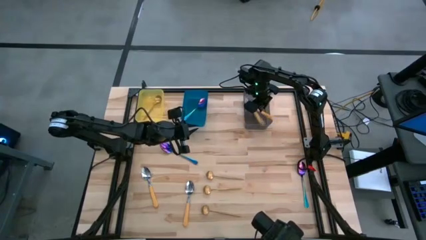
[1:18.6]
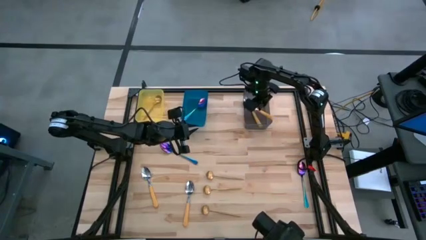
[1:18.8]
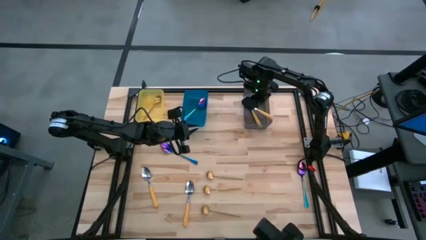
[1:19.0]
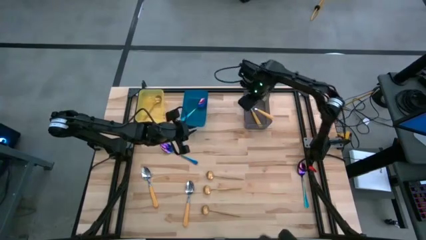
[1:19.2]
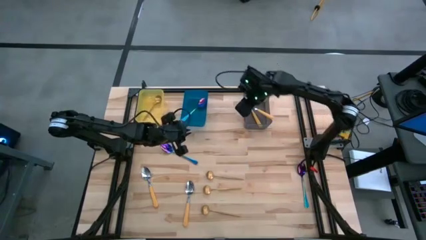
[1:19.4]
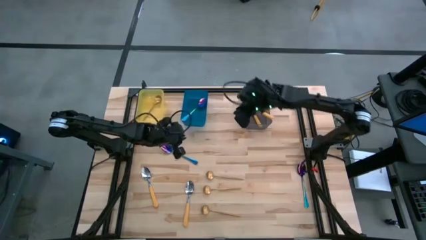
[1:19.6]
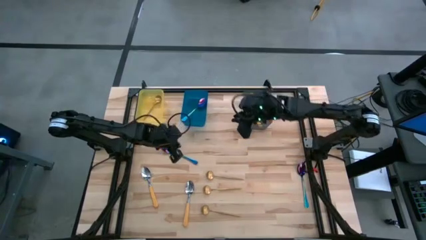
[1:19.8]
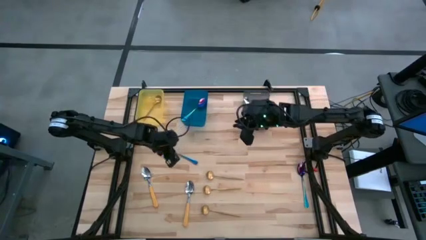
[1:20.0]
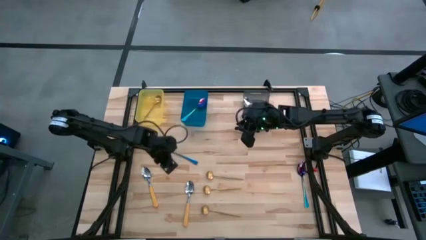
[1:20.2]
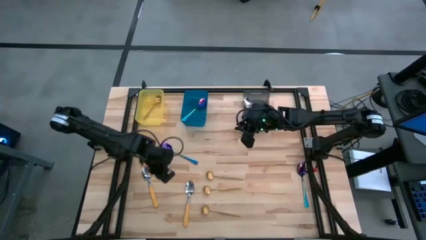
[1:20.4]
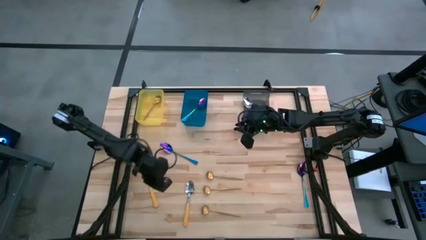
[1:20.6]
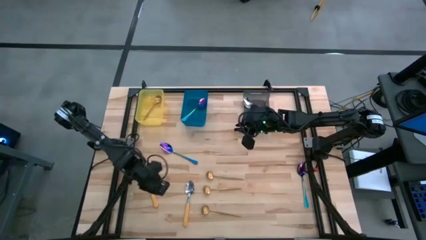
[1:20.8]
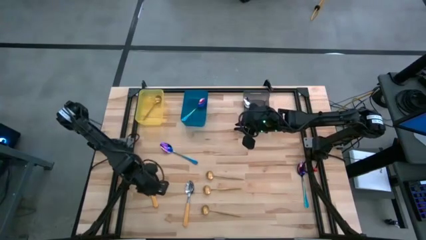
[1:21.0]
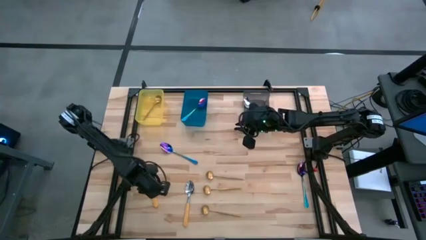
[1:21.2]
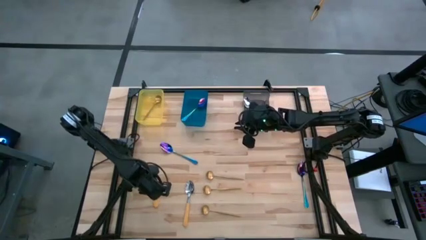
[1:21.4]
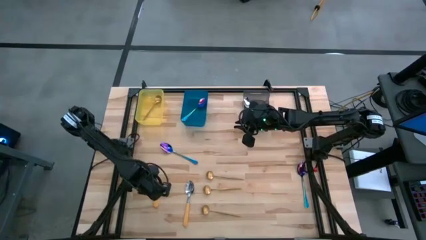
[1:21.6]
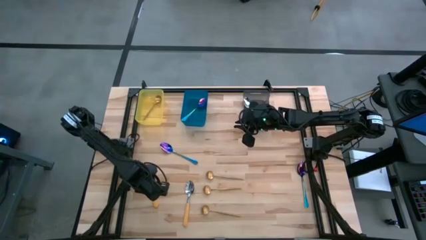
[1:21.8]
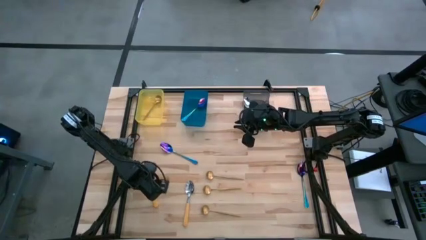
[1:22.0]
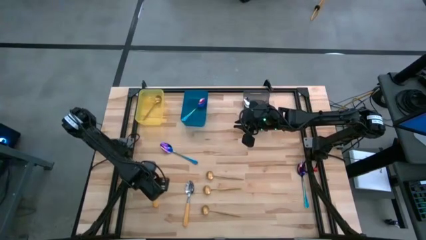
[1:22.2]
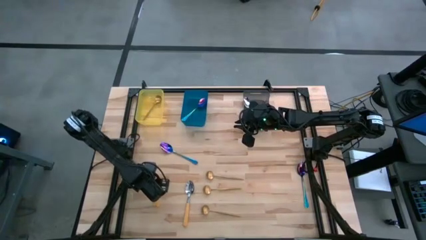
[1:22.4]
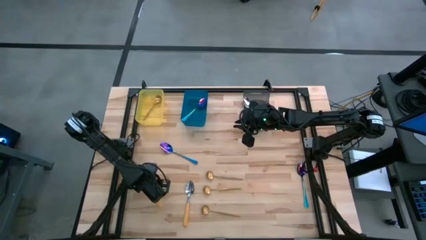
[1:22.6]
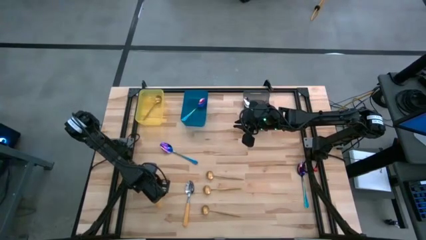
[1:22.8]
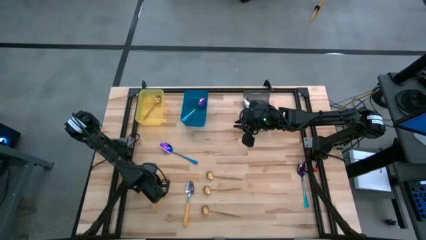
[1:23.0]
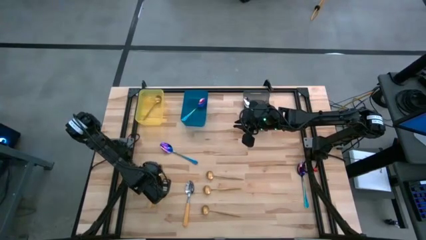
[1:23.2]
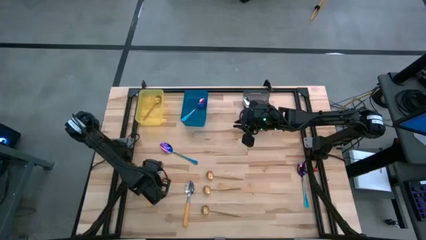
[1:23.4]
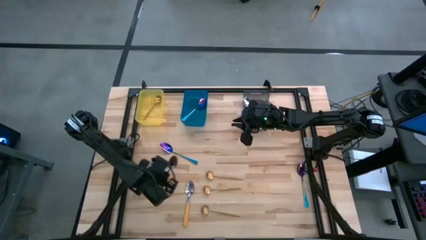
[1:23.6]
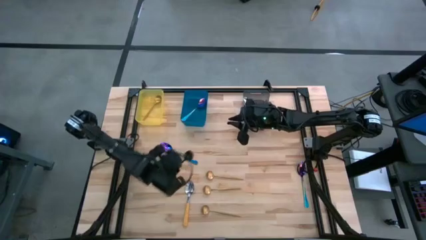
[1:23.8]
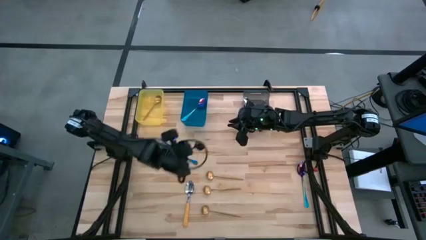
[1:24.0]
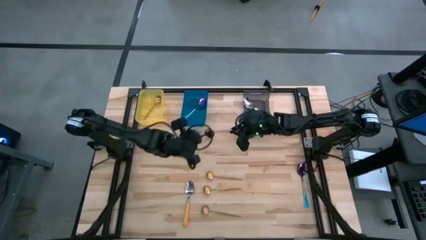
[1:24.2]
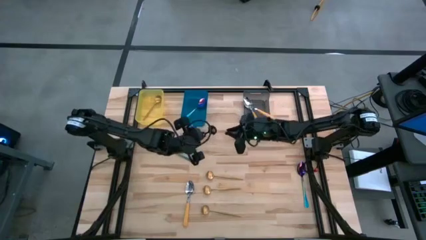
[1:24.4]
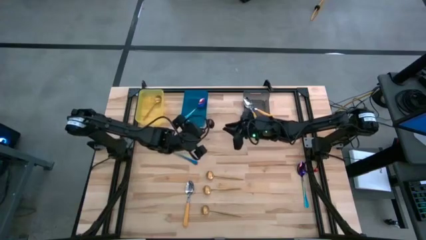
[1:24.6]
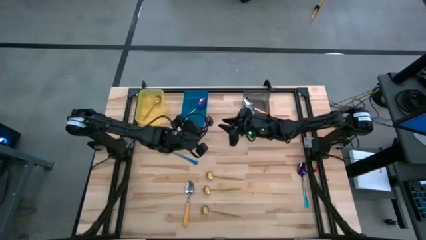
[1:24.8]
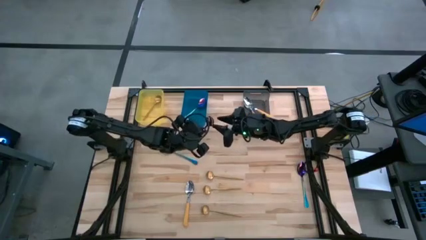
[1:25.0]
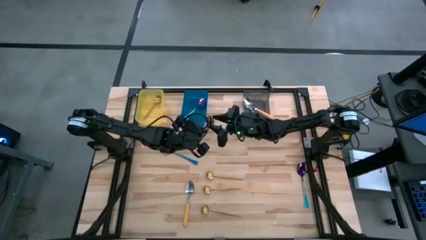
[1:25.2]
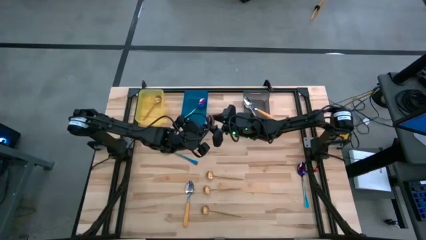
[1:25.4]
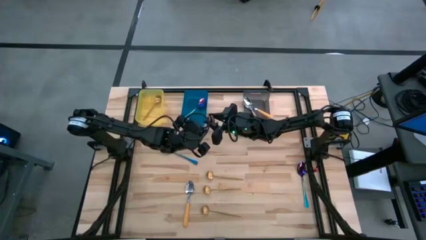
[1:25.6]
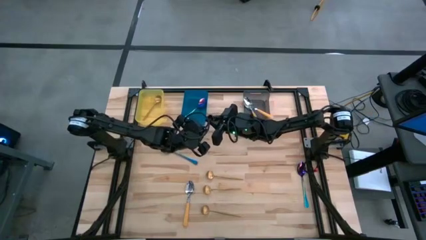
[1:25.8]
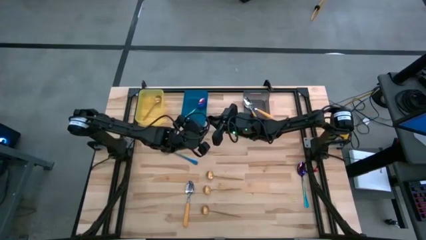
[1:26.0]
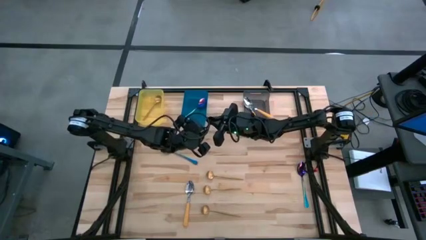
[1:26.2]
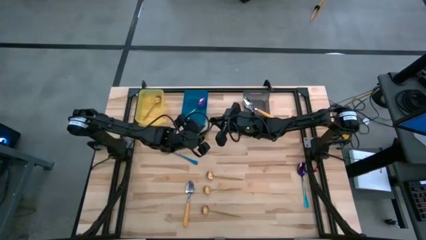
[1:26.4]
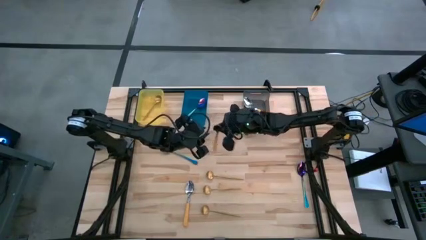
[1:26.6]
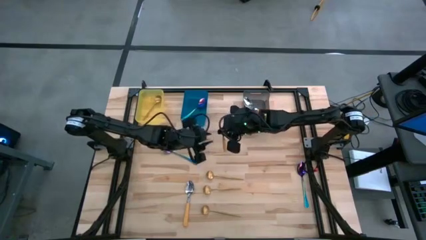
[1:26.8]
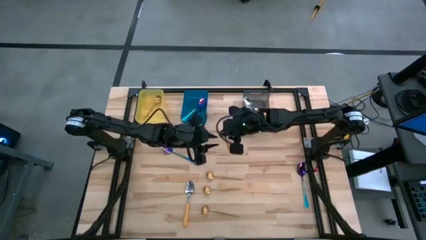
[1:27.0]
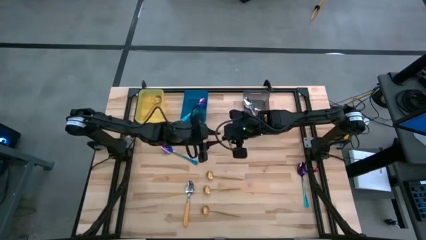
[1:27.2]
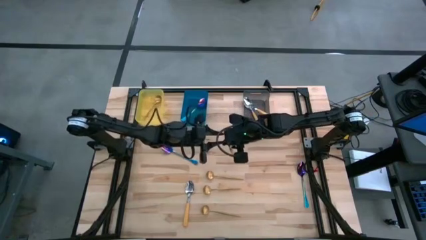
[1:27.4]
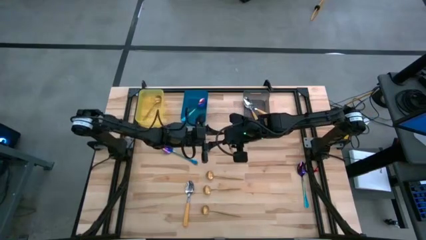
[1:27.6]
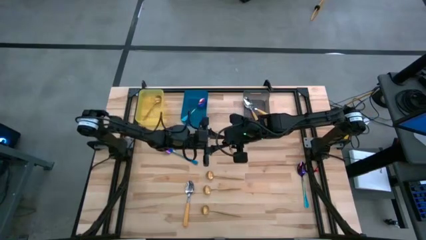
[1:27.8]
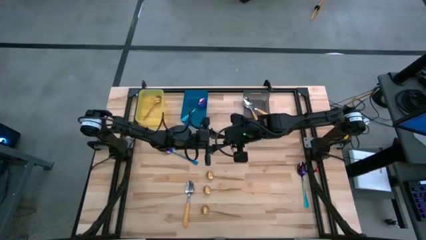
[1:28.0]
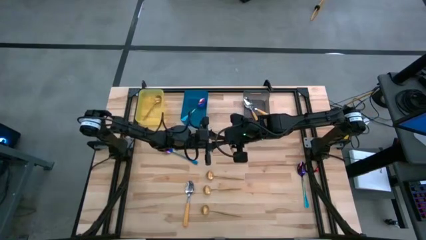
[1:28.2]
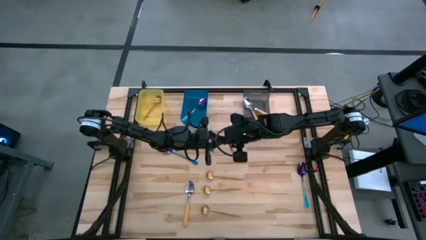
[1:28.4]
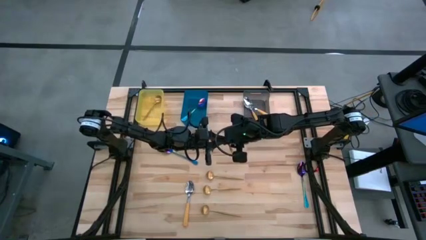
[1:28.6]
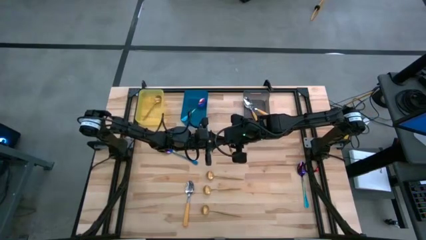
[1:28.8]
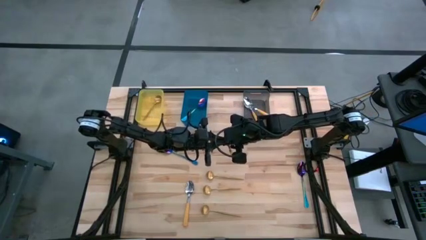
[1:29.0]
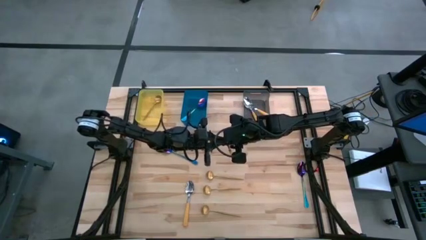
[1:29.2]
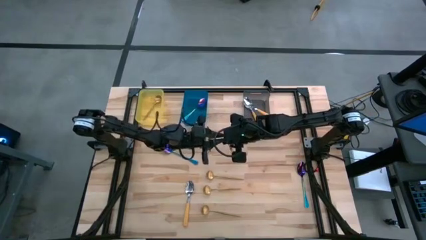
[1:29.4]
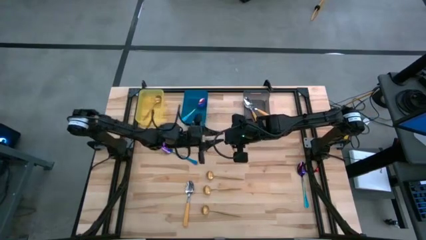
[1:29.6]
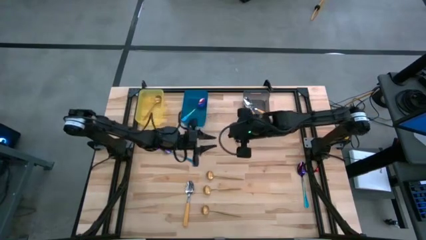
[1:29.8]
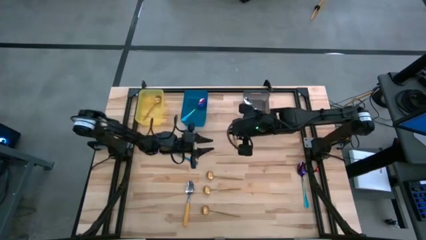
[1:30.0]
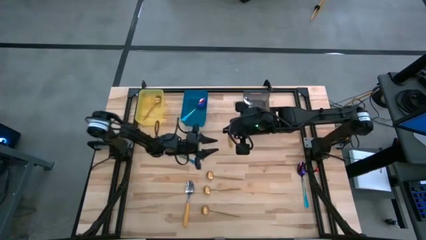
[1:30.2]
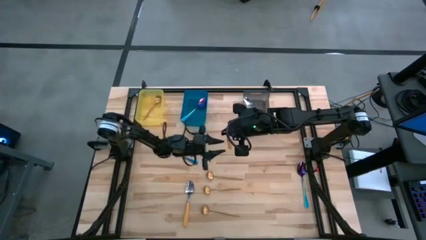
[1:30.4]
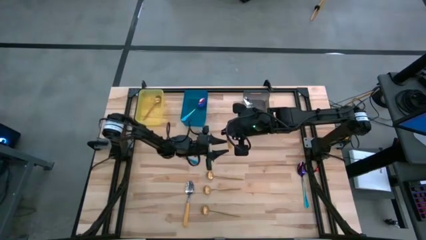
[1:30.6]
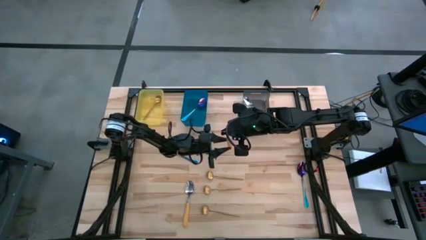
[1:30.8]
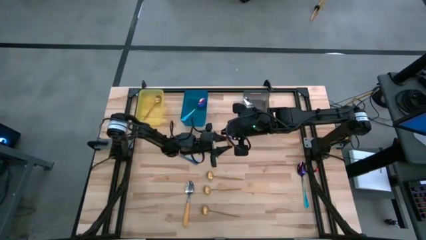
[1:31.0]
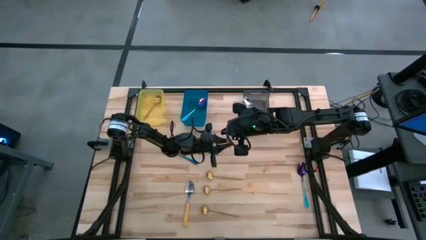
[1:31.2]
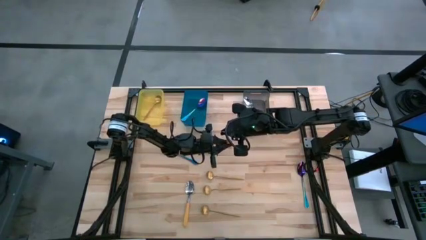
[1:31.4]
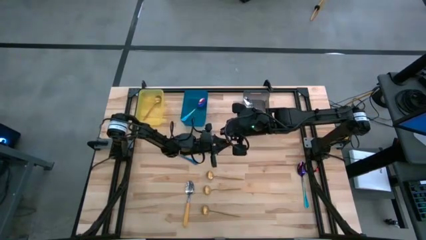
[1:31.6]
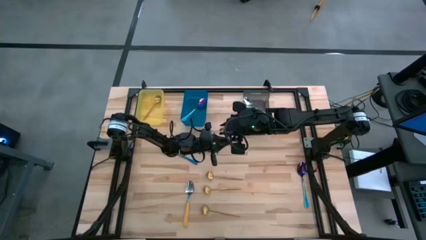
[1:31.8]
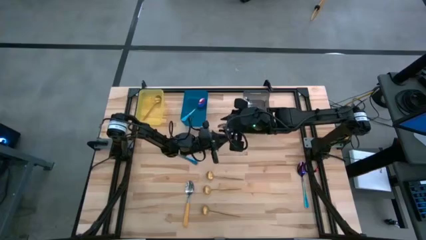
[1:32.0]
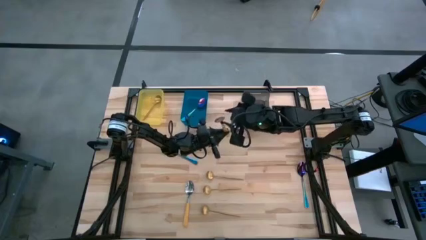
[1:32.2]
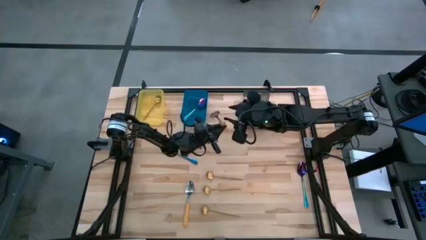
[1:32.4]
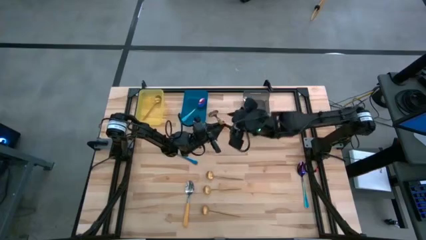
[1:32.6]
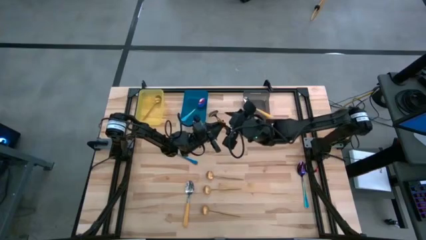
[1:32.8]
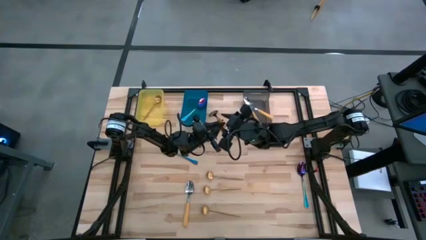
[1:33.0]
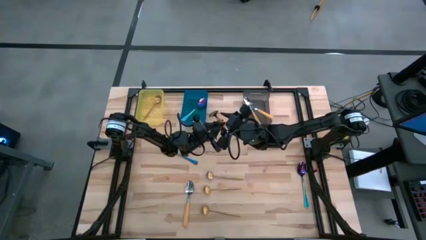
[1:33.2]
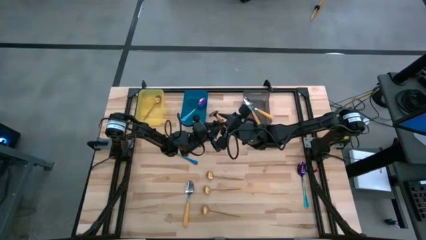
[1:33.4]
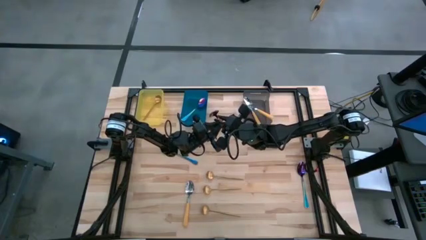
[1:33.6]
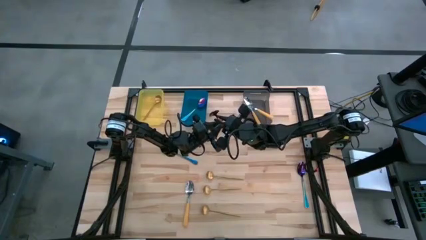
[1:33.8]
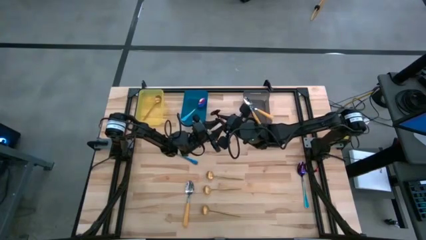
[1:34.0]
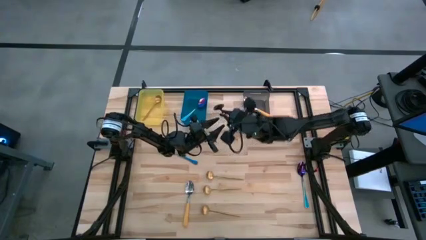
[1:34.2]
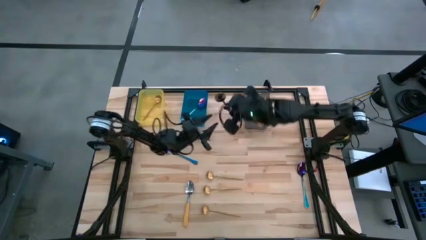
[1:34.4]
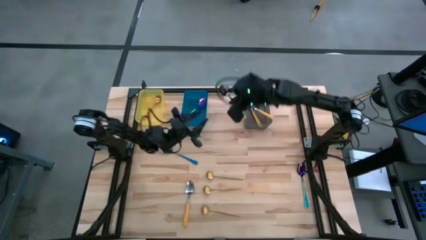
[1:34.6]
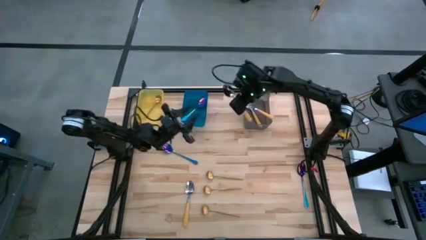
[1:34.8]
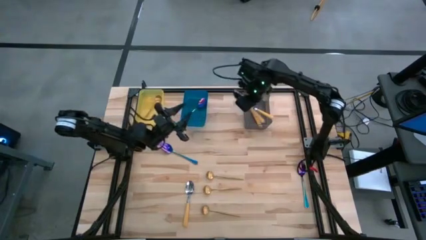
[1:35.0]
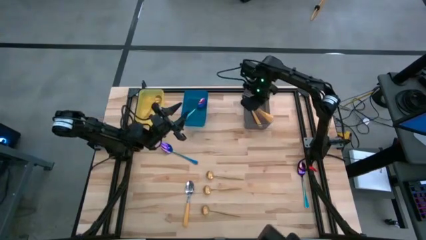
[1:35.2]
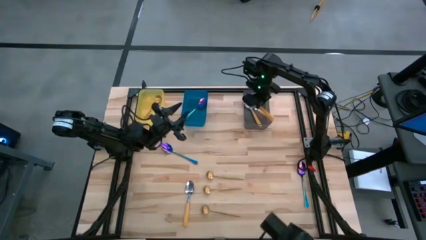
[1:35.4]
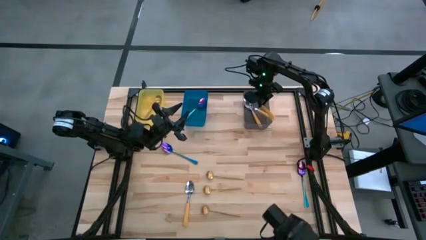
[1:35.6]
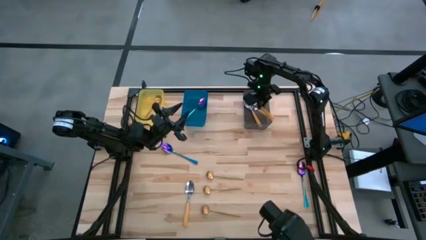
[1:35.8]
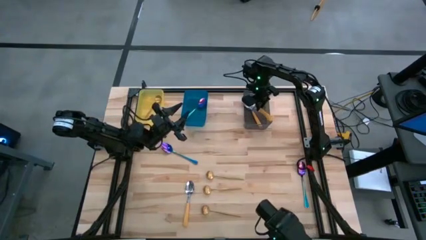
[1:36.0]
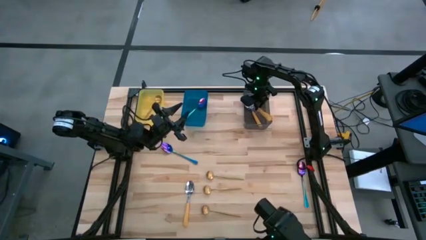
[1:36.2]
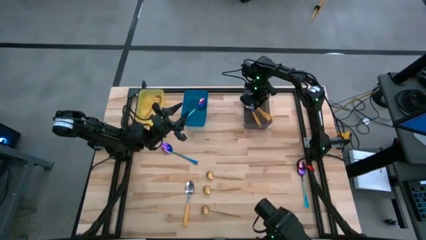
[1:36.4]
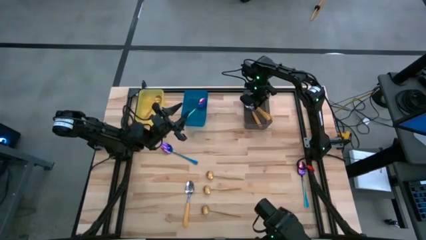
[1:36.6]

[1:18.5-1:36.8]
Task: Sort silverware by color (type)
Put the yellow spoon into the black bin
